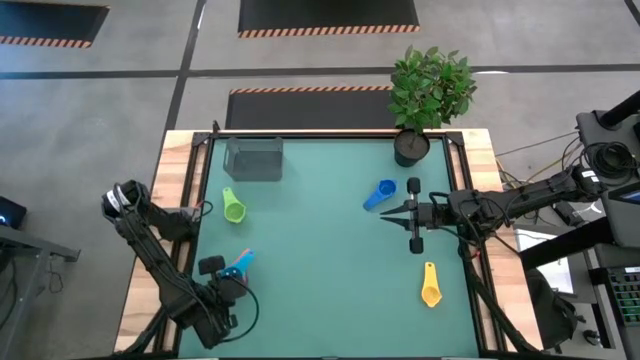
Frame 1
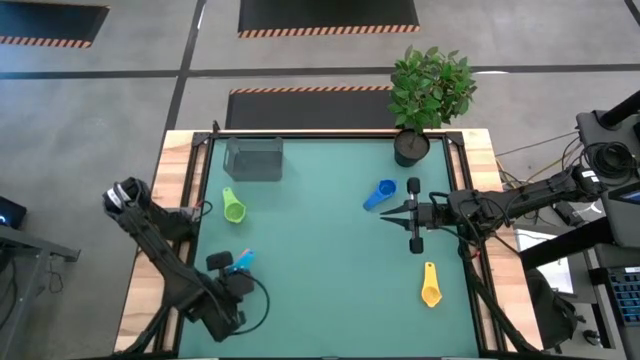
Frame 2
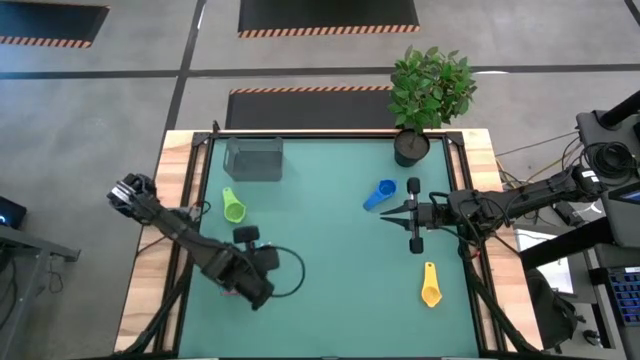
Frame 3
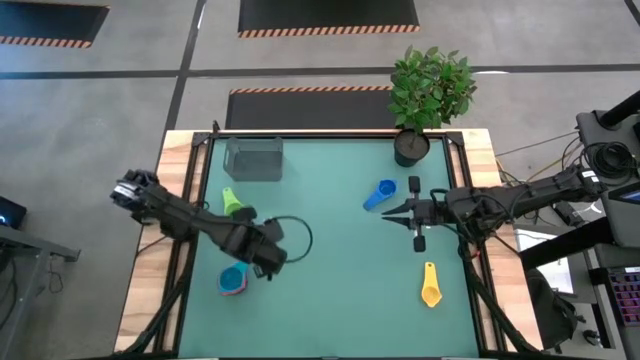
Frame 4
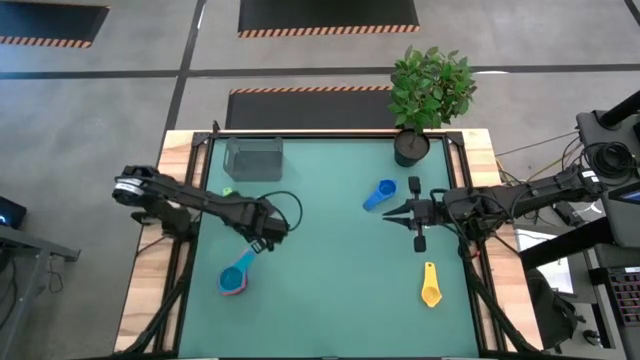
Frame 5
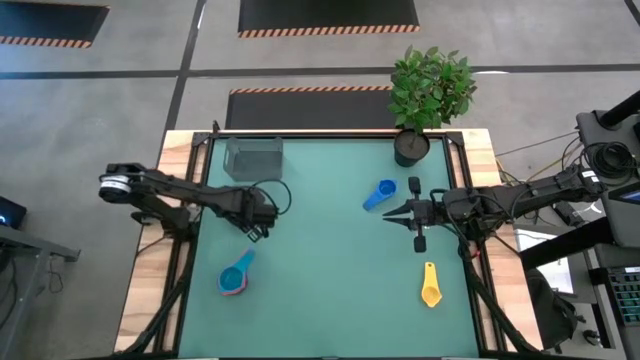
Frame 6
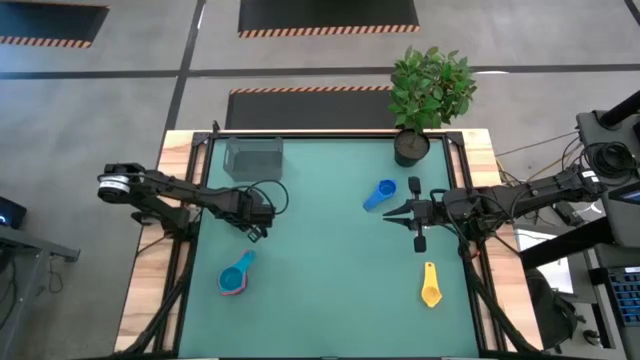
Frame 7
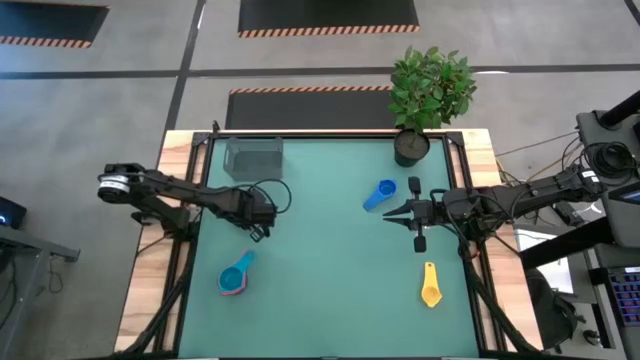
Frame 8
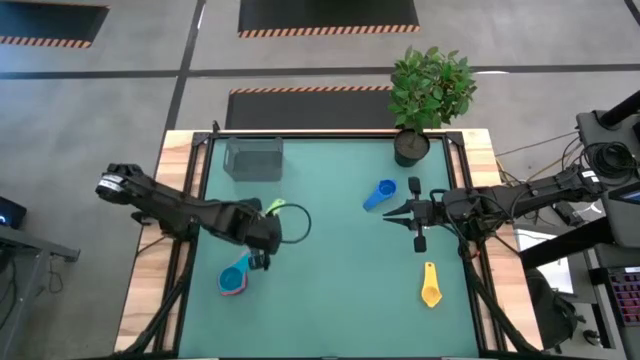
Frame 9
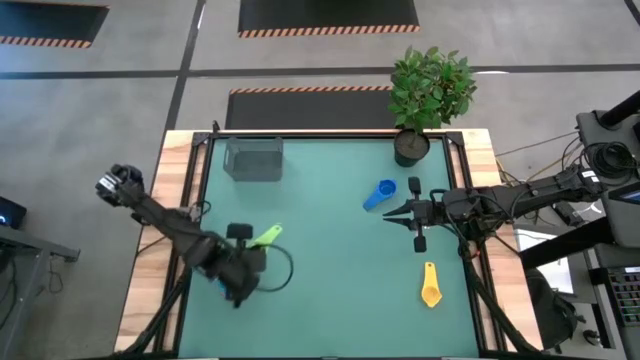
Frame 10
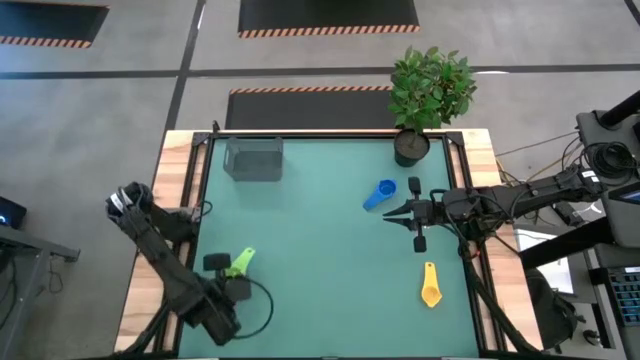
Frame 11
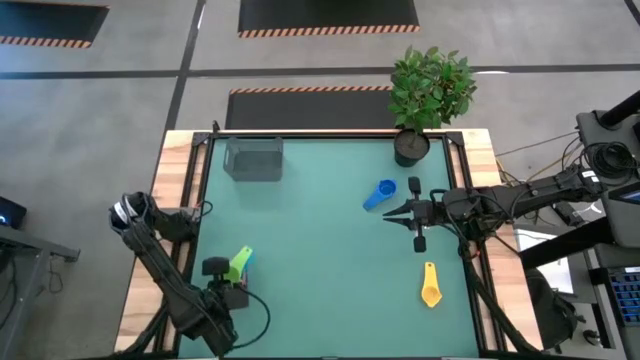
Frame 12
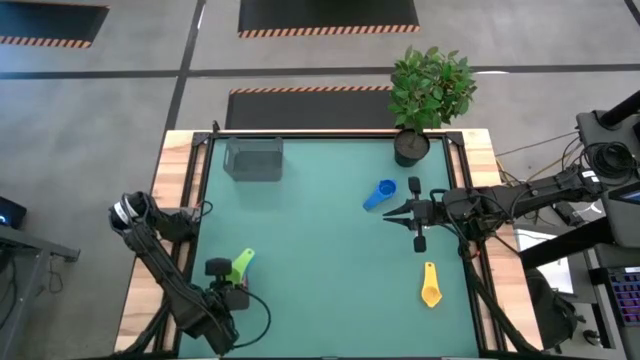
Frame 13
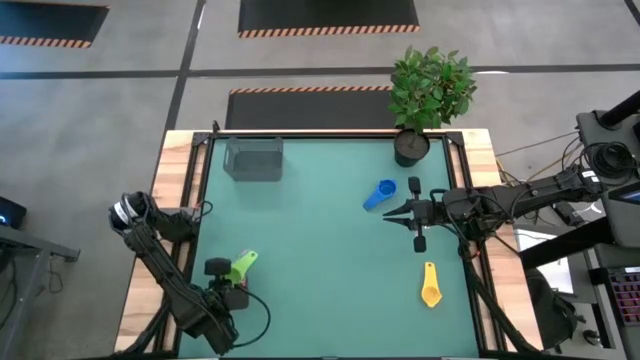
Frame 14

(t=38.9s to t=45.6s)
Task: Nest measuring cups in basket
Stack the green measuring cup on top of the light blue measuring cup

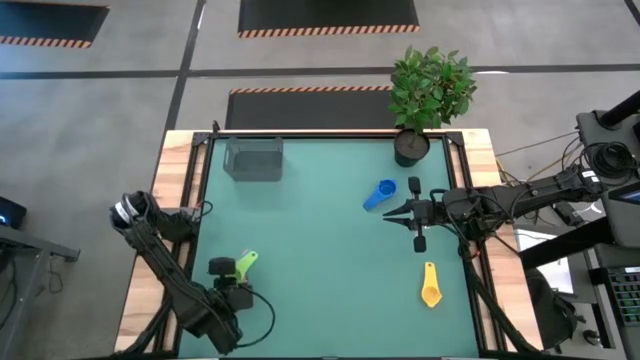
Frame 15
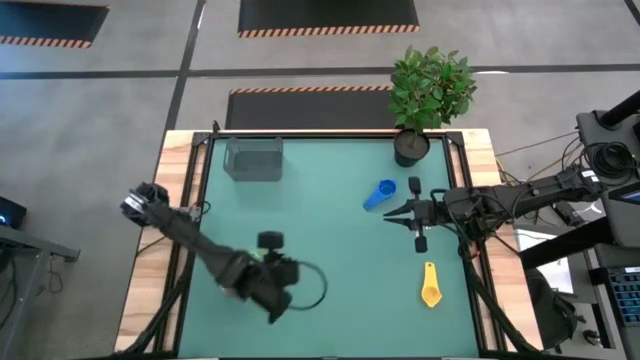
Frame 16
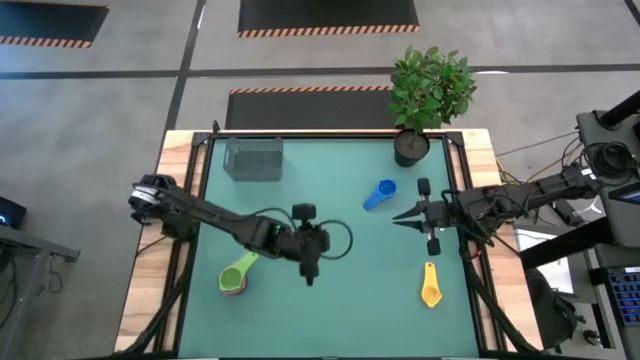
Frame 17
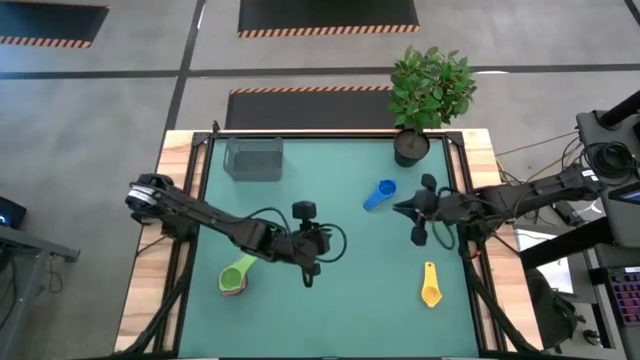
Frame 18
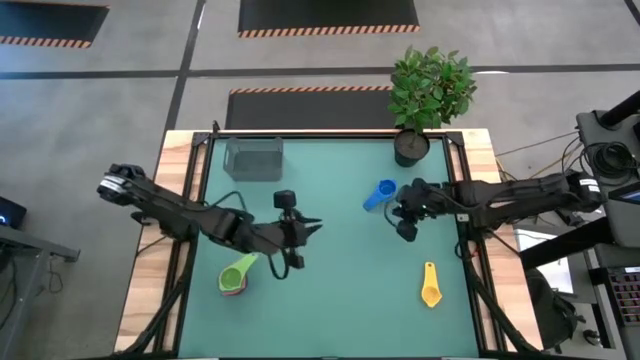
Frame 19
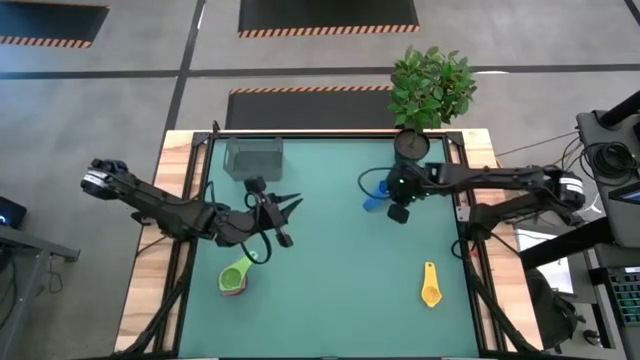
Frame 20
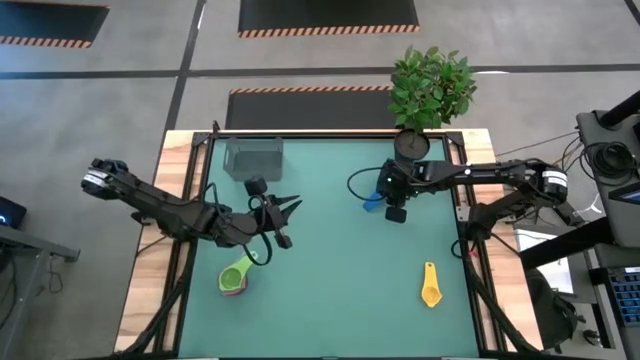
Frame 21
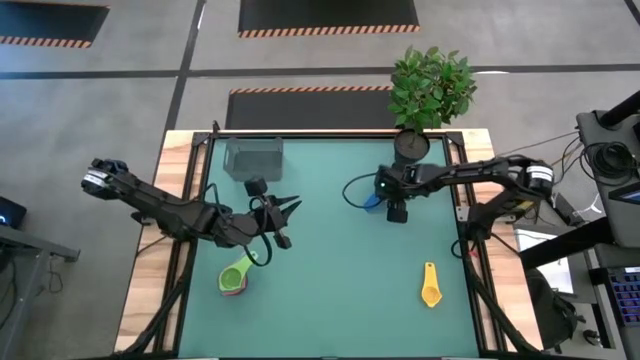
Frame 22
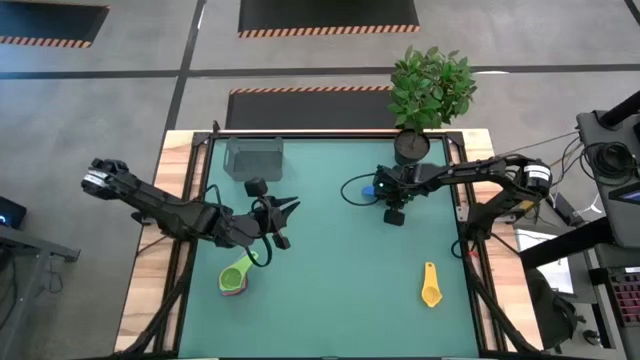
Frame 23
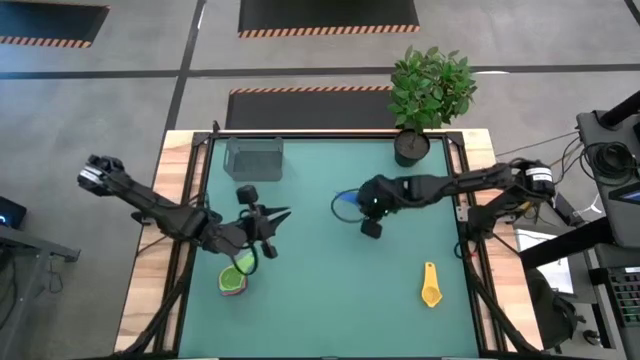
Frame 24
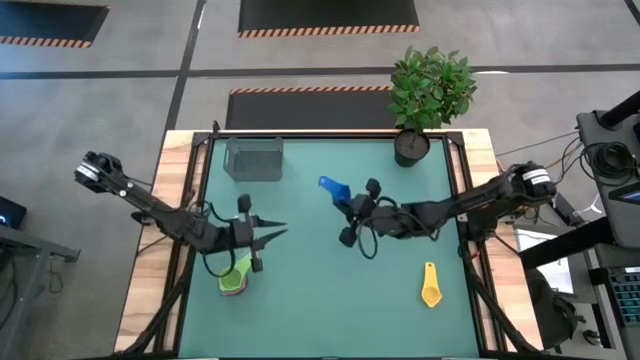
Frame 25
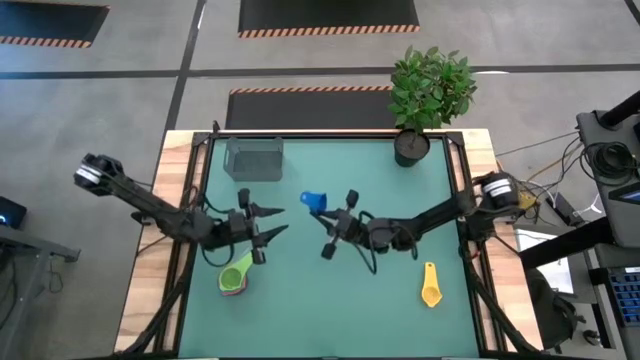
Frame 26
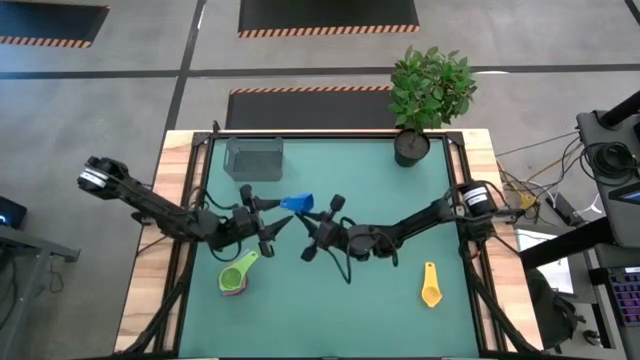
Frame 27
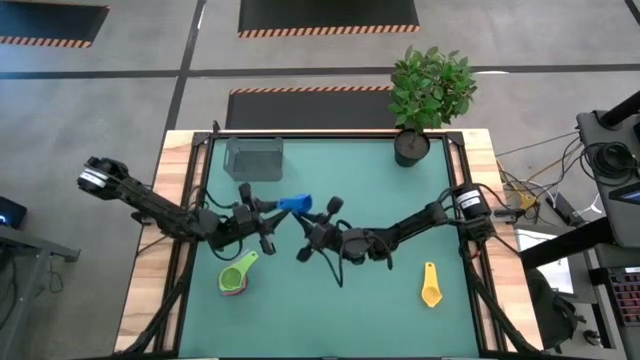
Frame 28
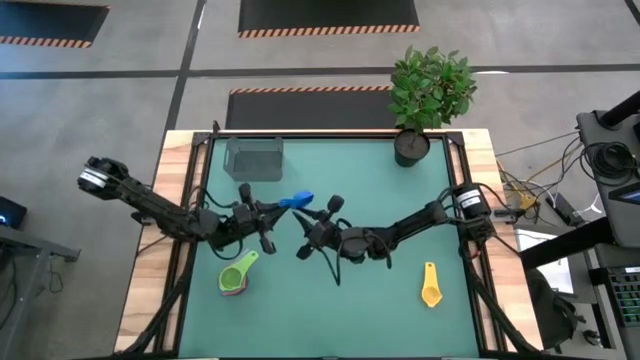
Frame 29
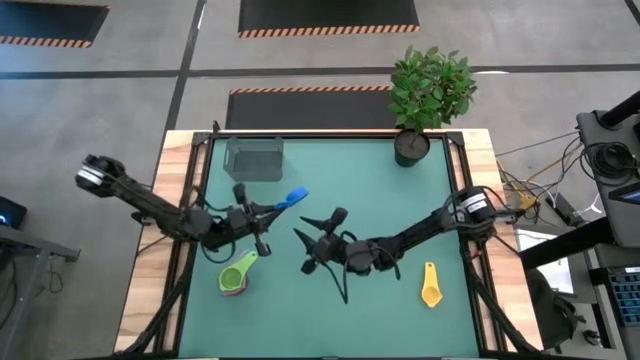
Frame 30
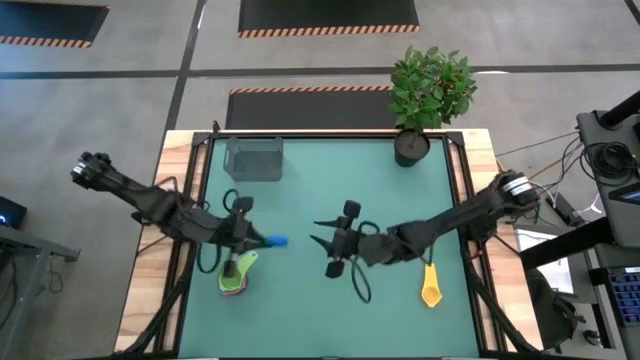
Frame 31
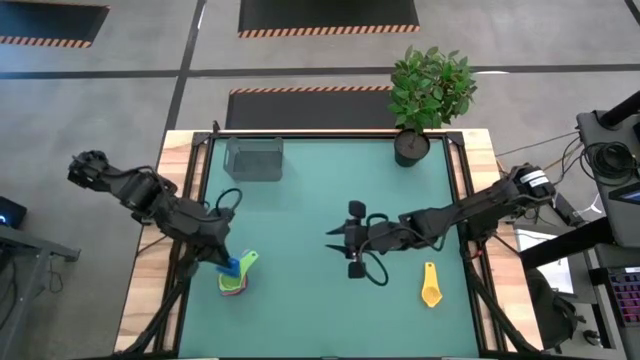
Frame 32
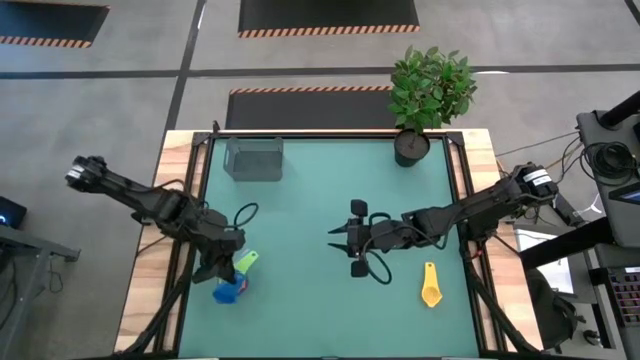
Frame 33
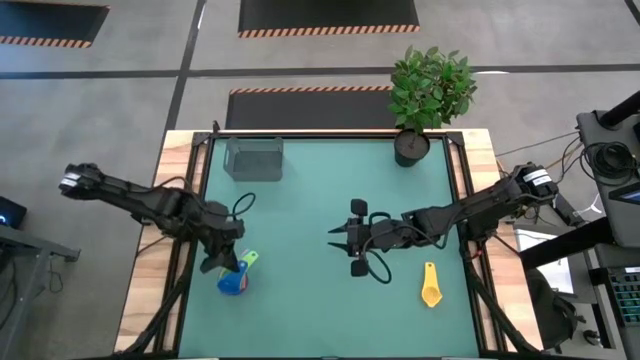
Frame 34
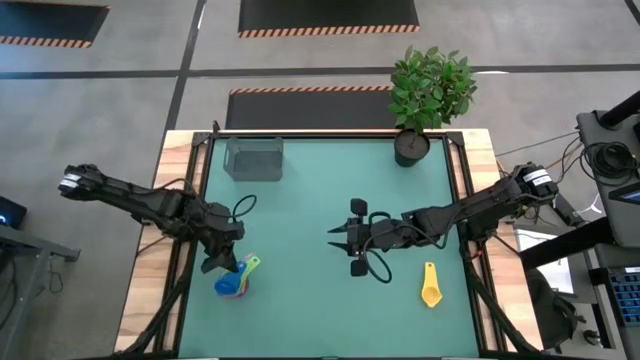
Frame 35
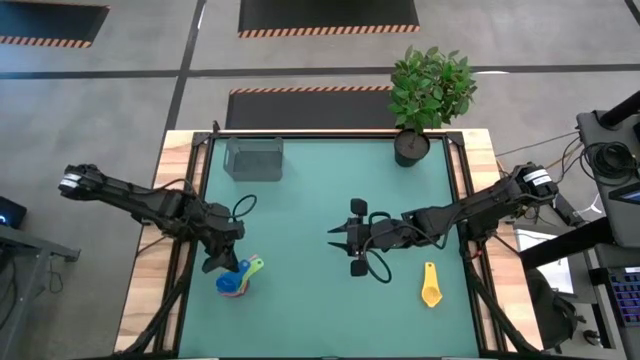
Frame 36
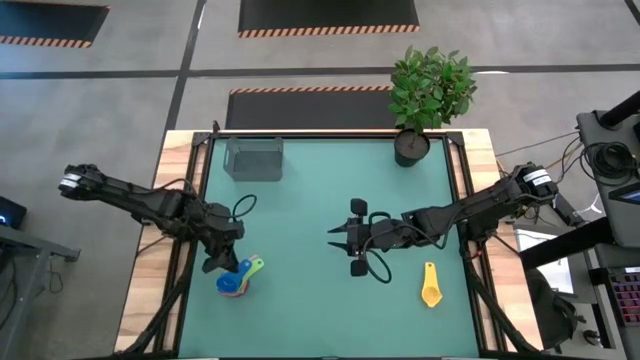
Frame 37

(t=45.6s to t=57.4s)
Stack the blue measuring cup on top of the green measuring cup

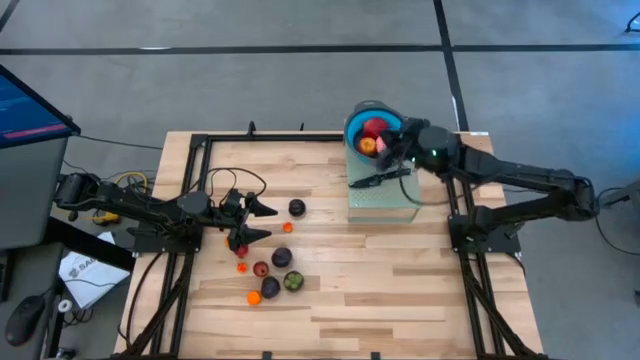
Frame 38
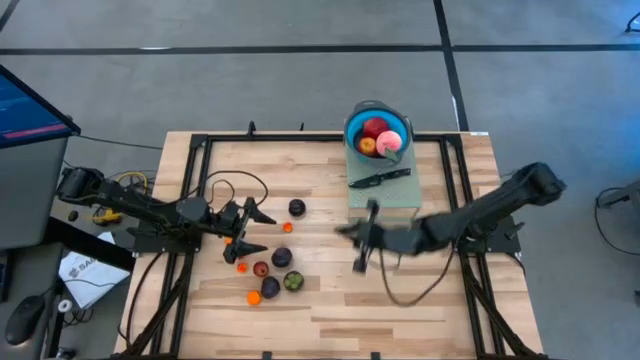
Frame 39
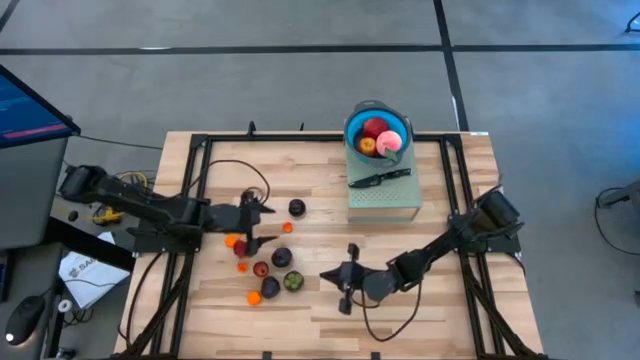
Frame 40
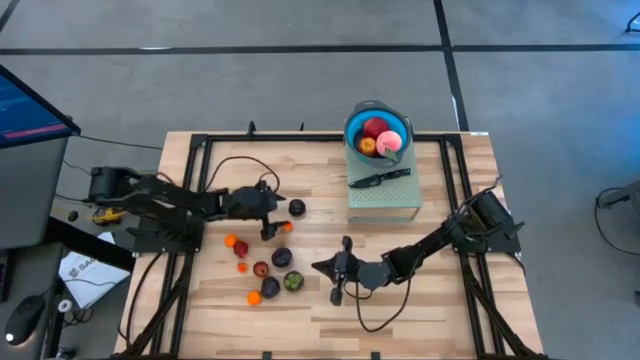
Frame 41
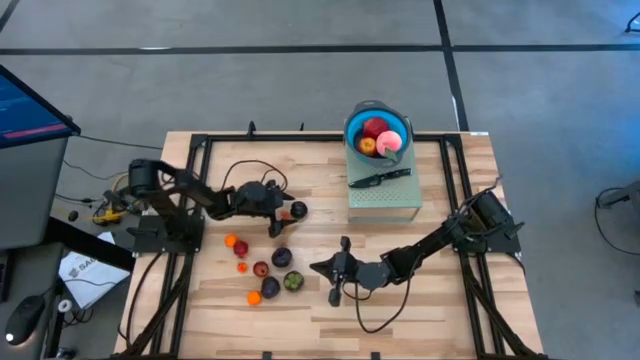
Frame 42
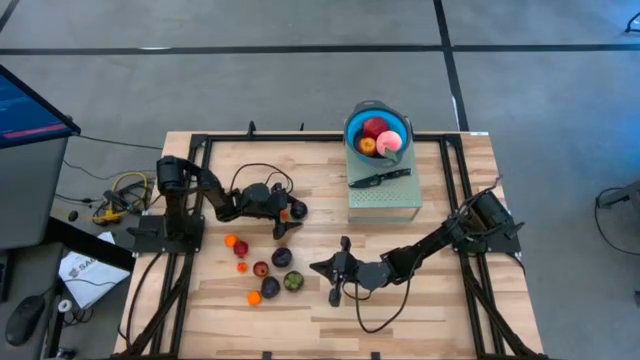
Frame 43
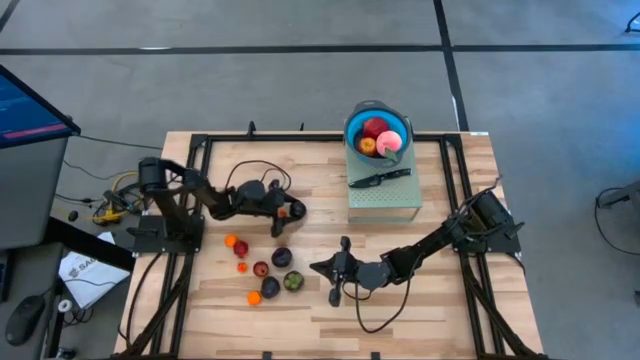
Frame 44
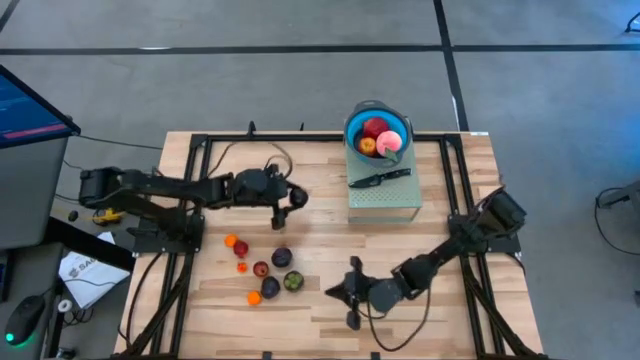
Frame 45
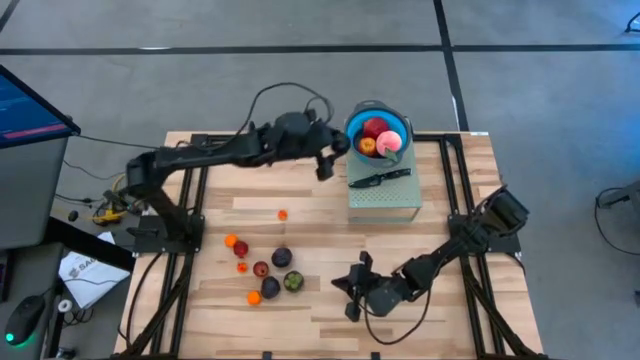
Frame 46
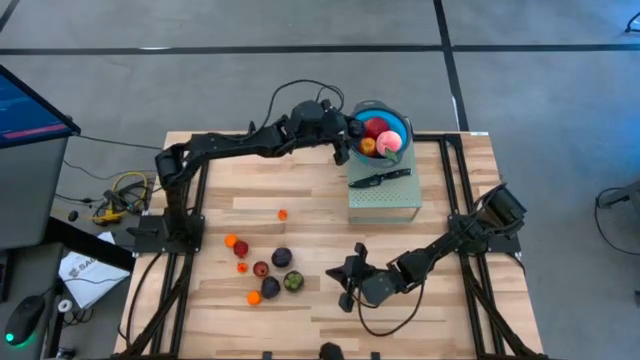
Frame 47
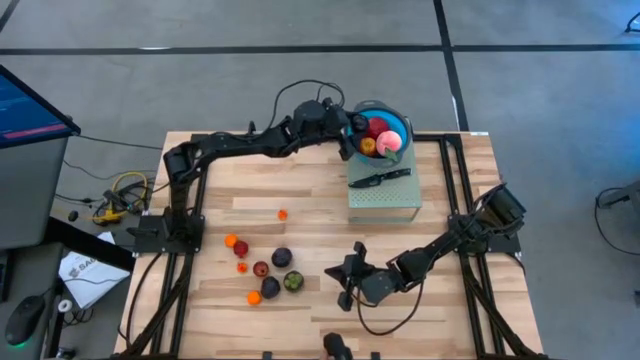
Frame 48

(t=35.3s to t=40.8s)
Task: Pick & Place Fruit
Put the top violet plum into the blue strainer bowl on the shelf
